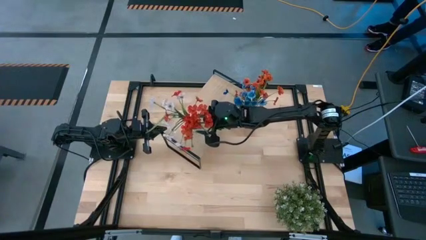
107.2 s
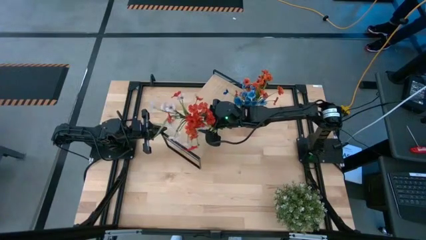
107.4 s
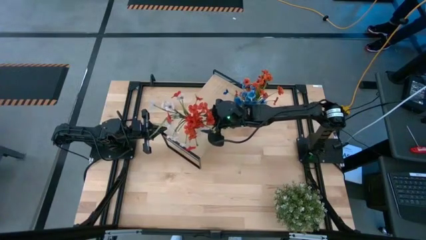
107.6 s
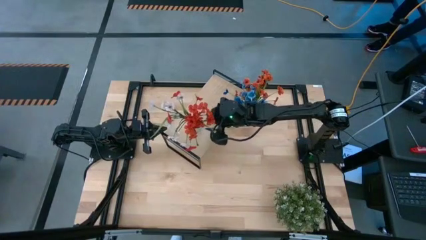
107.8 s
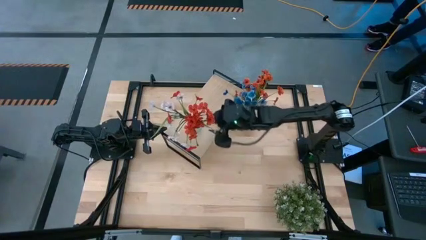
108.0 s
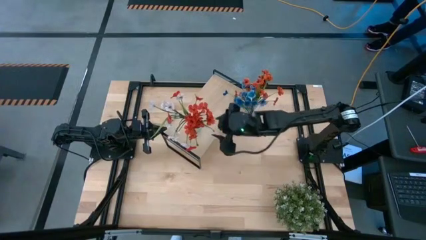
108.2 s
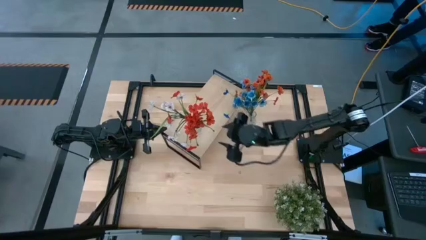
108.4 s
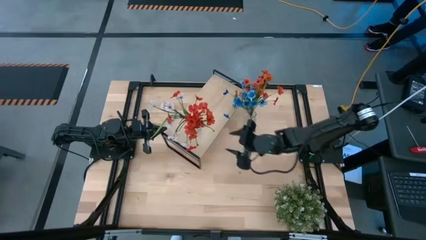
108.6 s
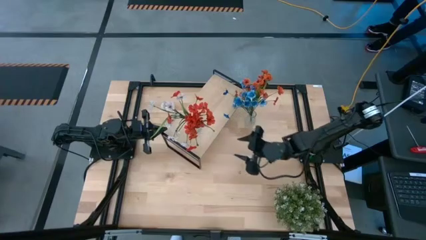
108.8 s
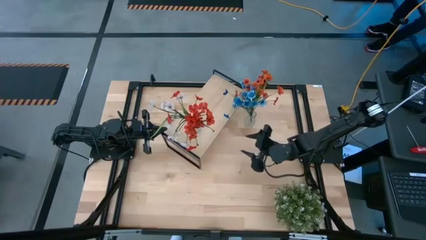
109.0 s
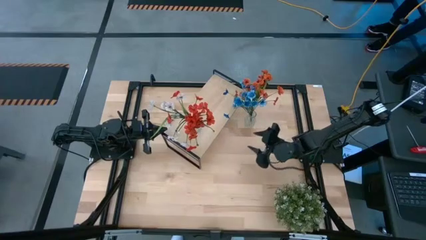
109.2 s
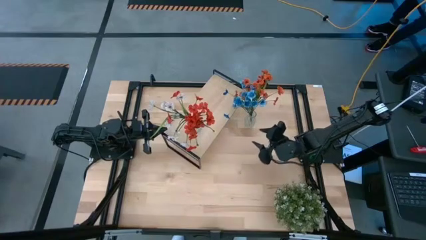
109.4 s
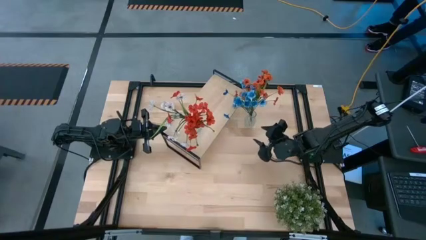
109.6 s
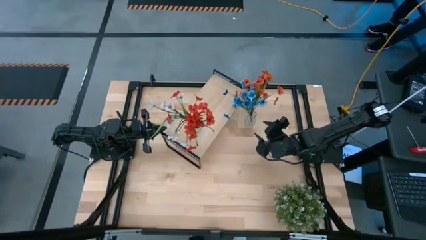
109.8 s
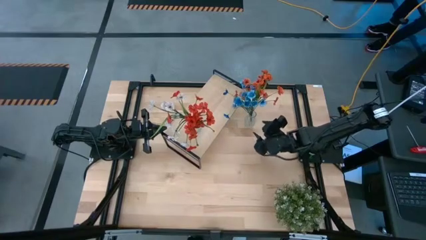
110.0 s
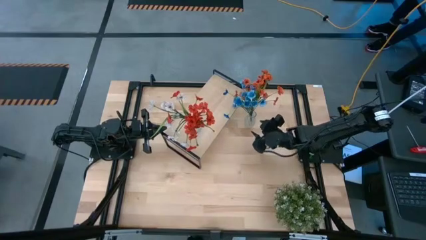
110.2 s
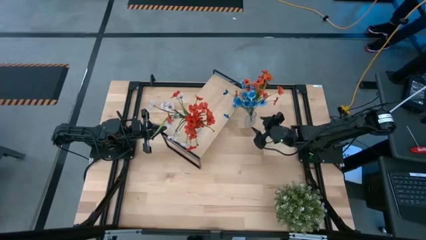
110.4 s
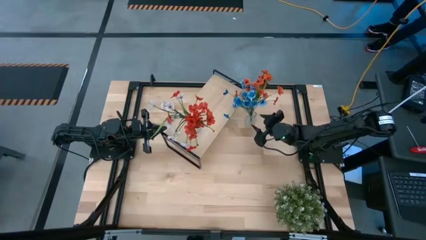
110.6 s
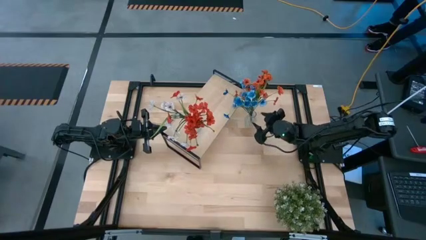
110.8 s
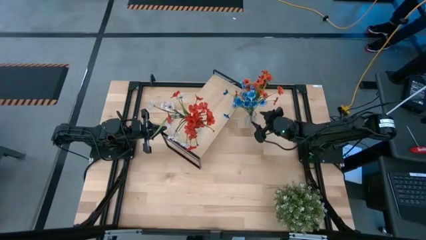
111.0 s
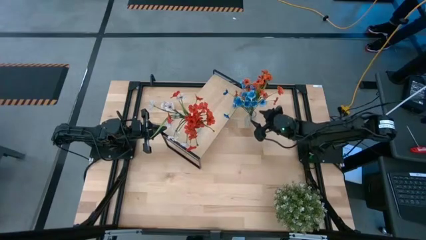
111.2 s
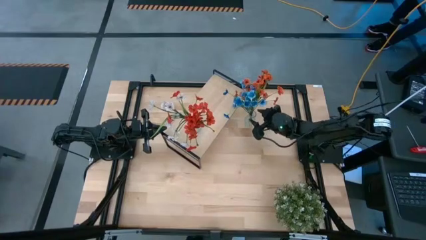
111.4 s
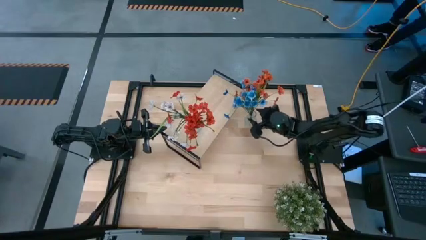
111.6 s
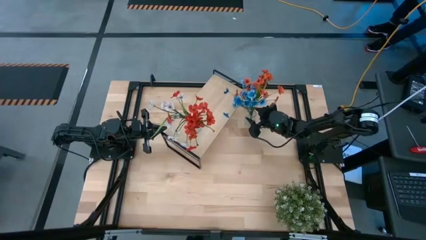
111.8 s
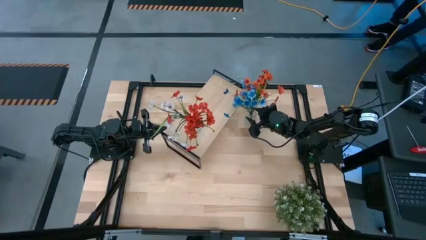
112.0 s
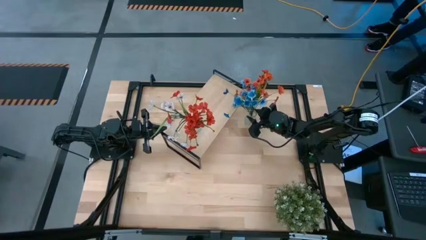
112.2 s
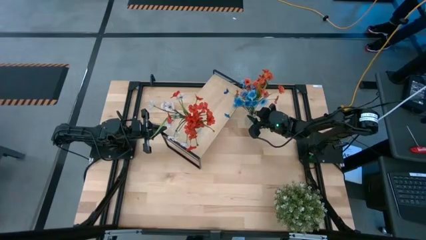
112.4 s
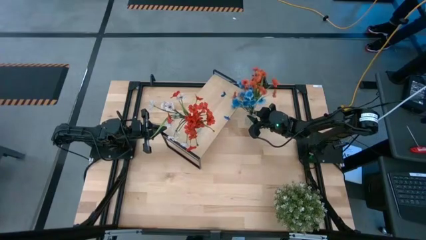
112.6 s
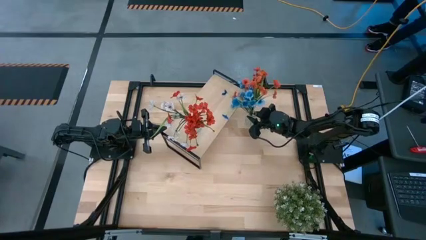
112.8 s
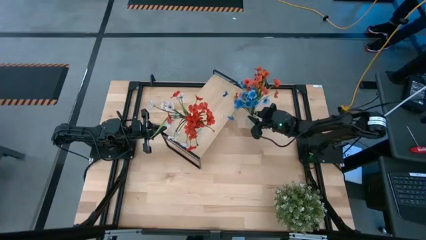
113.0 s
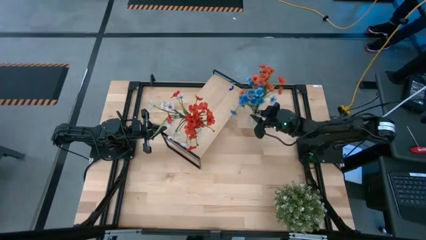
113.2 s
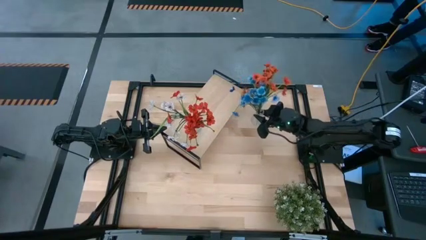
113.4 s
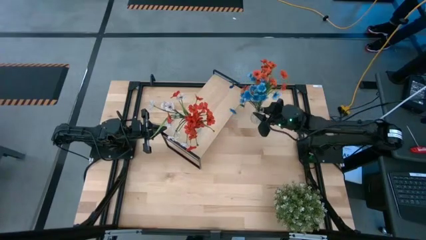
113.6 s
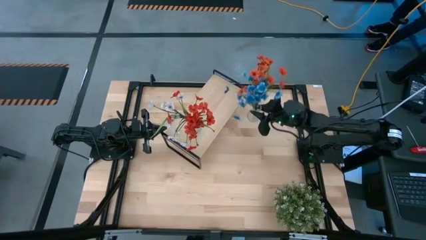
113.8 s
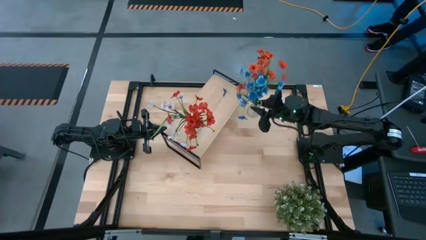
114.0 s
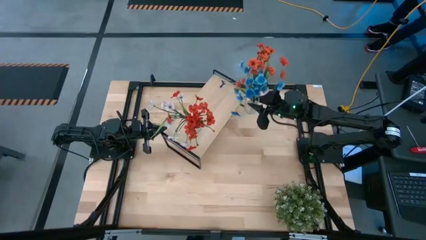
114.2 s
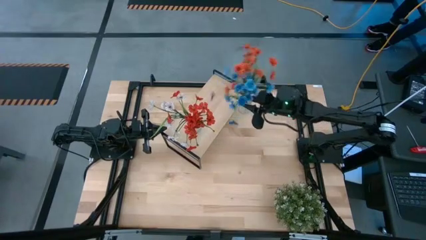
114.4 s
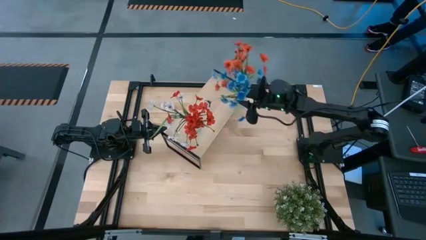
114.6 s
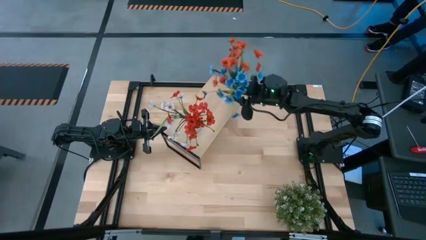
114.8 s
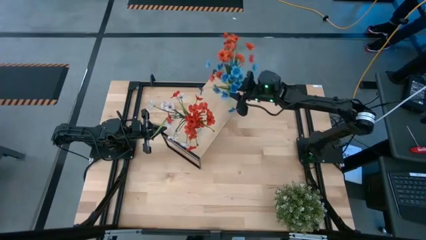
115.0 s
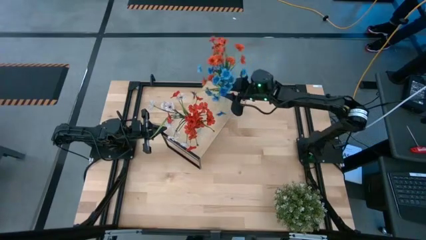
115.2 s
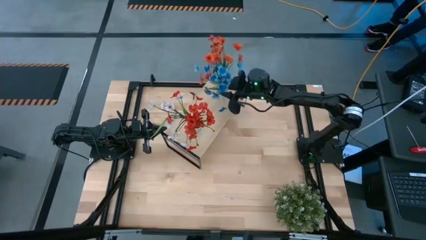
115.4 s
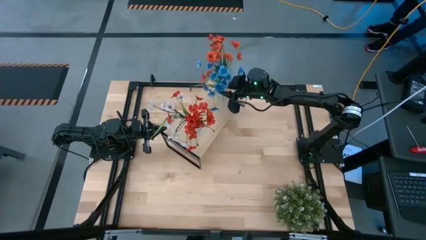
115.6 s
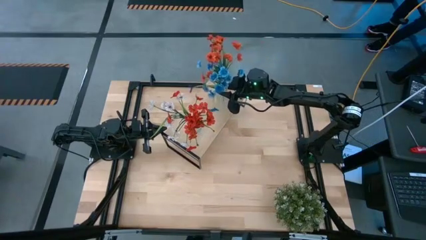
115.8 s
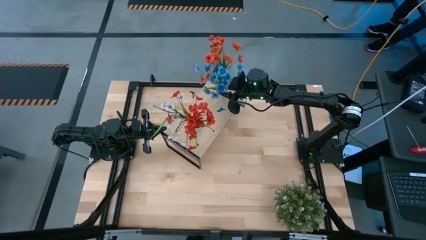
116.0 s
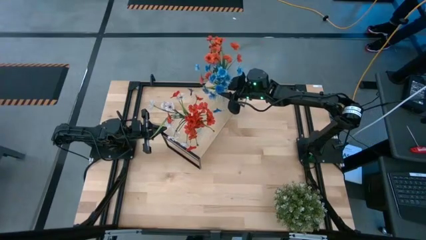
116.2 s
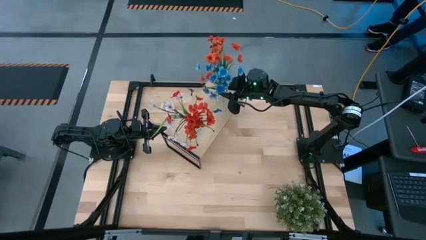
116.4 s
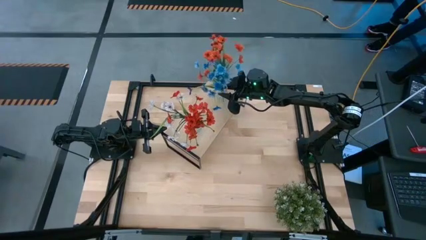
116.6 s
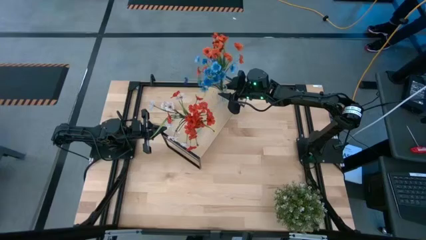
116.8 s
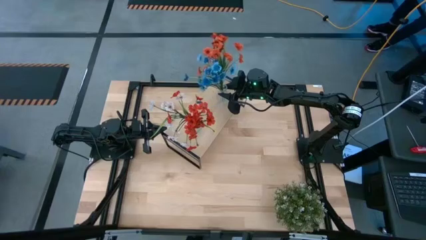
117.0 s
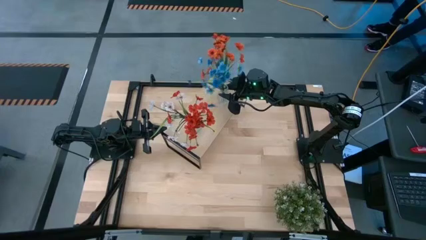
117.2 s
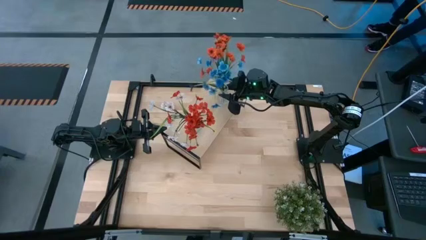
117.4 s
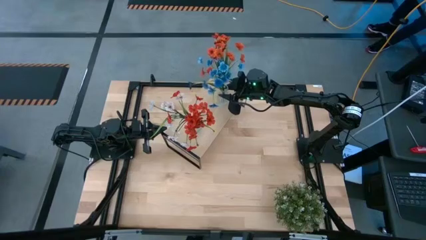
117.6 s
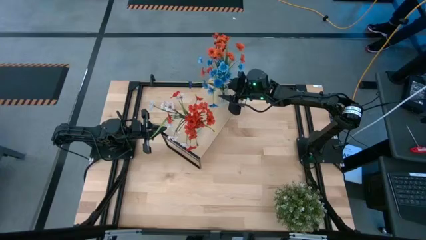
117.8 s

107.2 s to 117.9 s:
Task: Pick and place flowers into a vace then onto a shelf
Put the transparent flower vase with flowers on the shelf

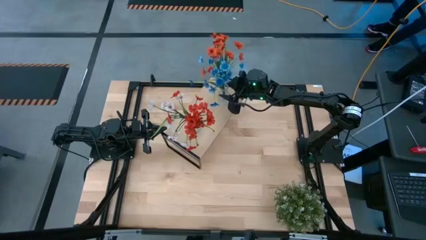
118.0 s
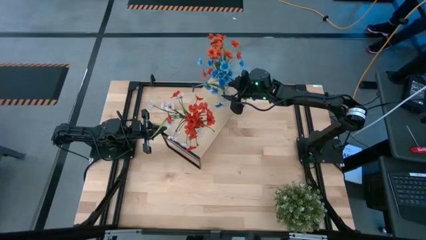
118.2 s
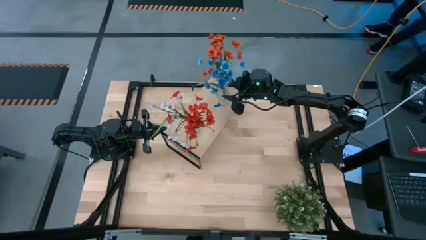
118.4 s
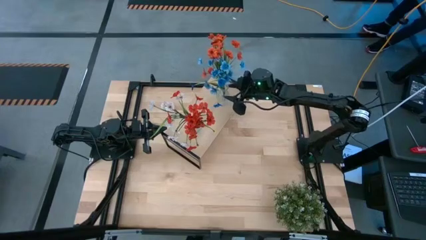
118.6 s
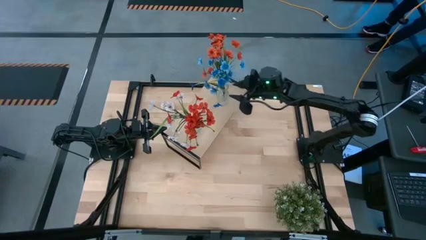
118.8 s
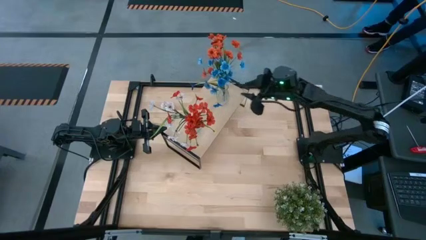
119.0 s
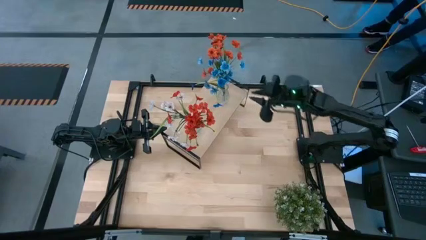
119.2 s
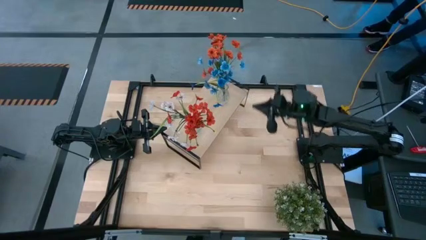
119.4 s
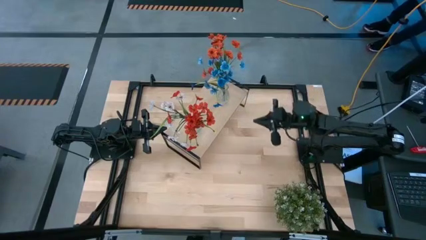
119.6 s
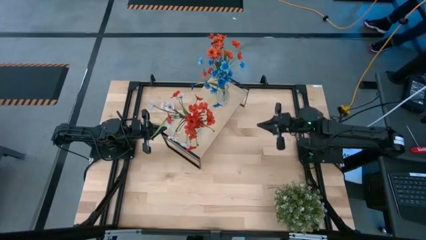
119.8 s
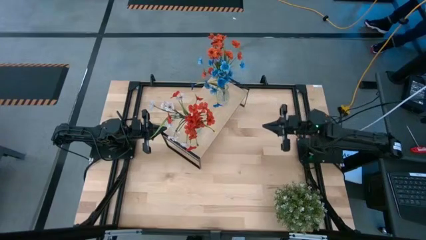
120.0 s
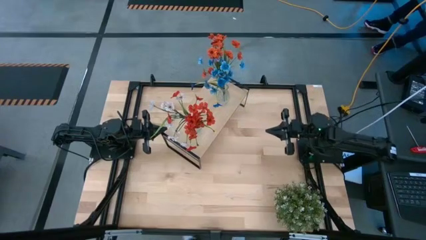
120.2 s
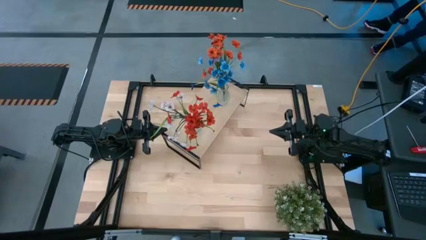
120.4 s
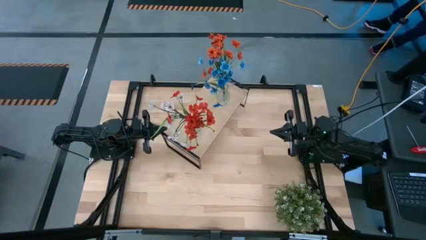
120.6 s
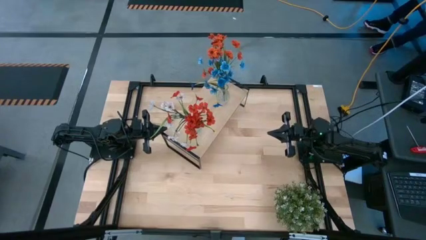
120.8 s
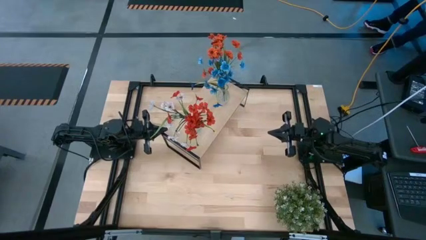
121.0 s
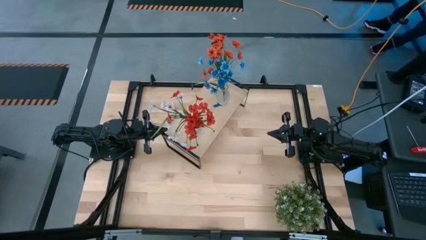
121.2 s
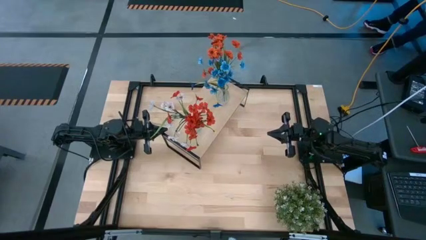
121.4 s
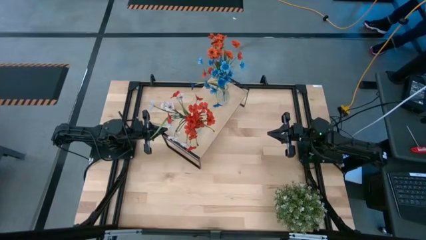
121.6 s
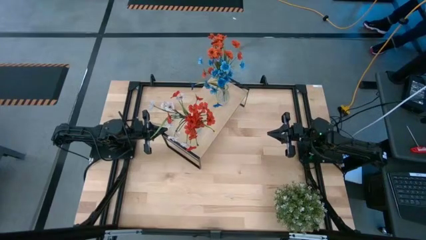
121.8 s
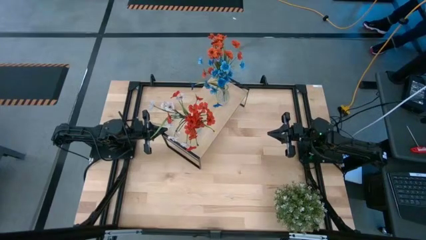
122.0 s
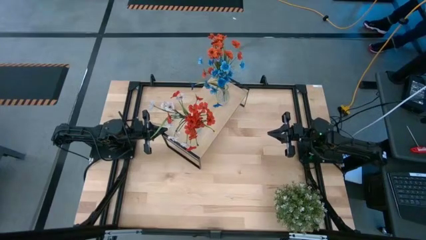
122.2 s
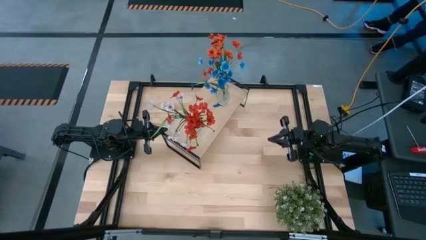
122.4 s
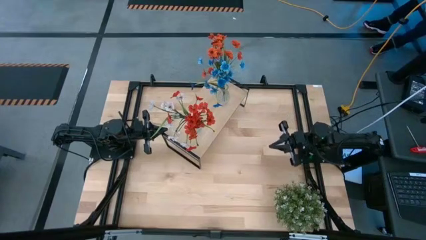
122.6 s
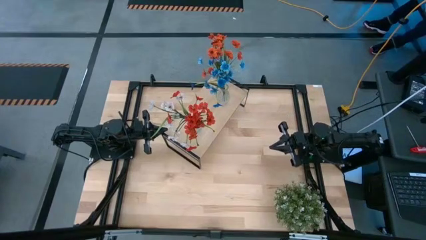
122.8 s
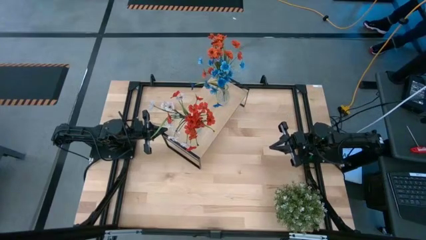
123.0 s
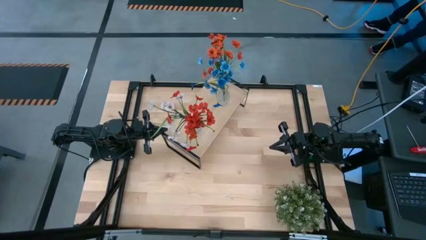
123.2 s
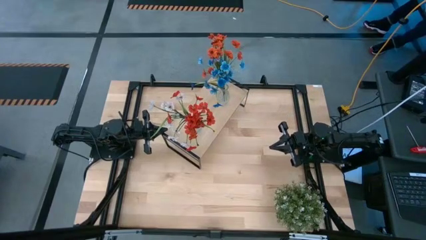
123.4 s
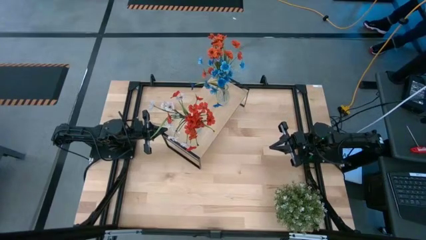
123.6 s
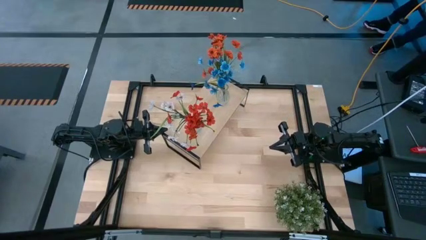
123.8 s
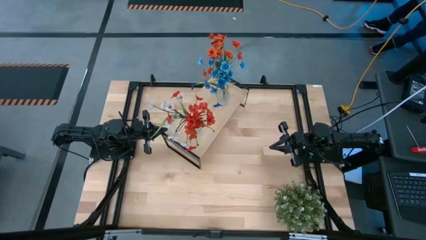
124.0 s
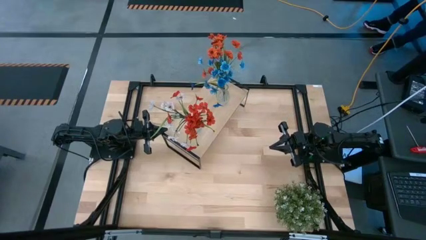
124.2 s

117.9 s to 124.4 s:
Return to Home Position
